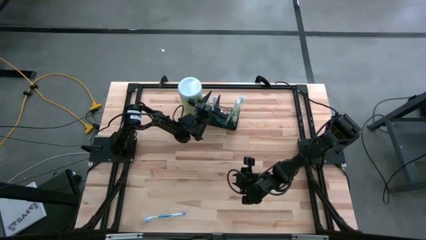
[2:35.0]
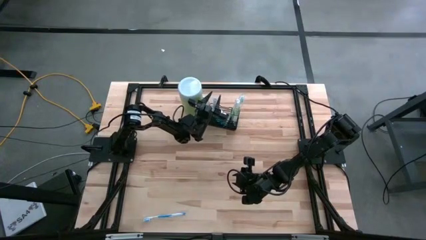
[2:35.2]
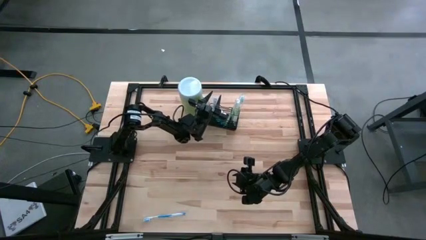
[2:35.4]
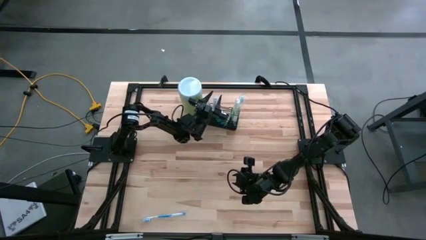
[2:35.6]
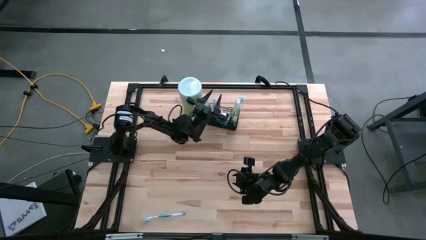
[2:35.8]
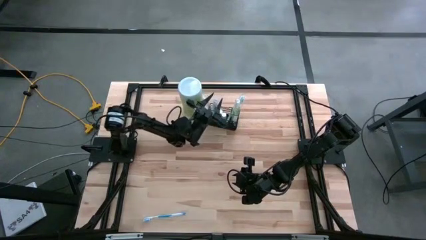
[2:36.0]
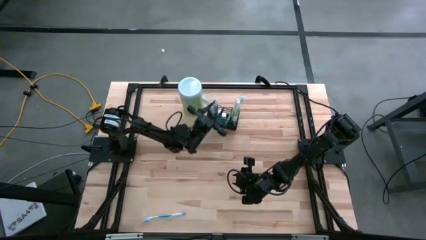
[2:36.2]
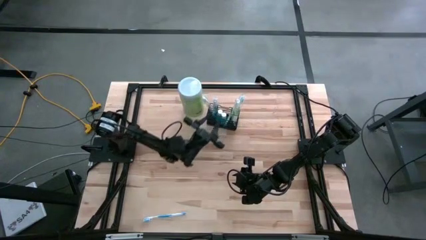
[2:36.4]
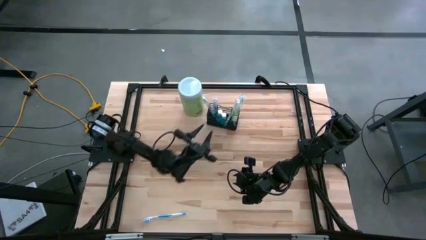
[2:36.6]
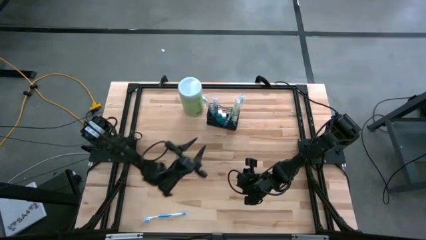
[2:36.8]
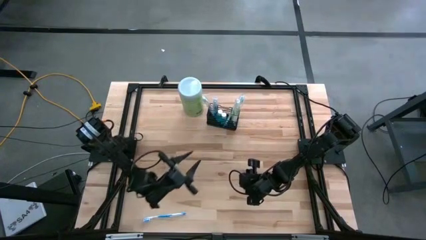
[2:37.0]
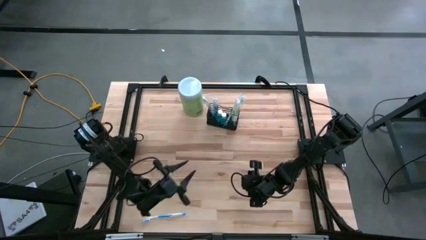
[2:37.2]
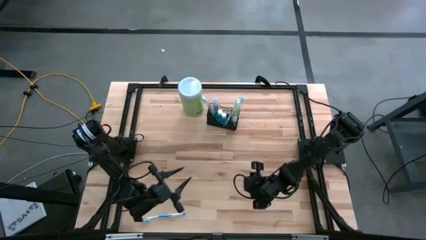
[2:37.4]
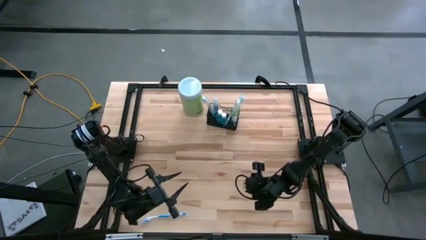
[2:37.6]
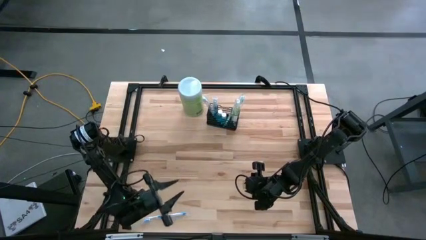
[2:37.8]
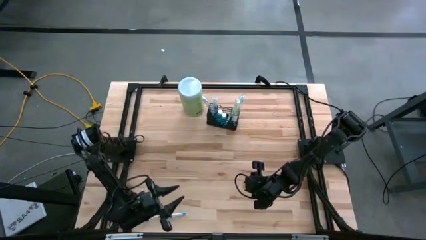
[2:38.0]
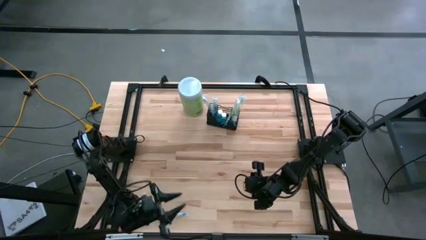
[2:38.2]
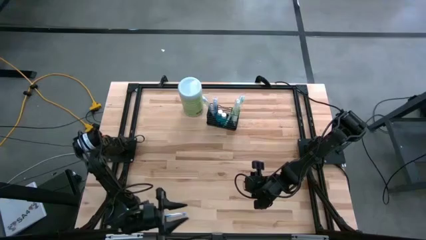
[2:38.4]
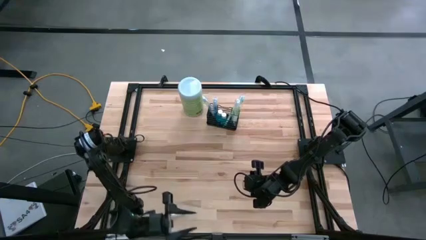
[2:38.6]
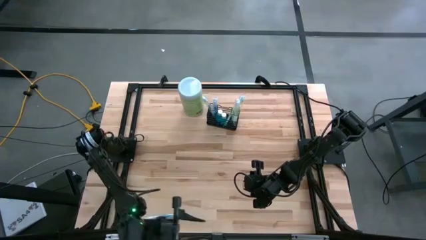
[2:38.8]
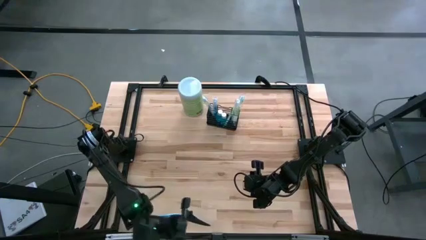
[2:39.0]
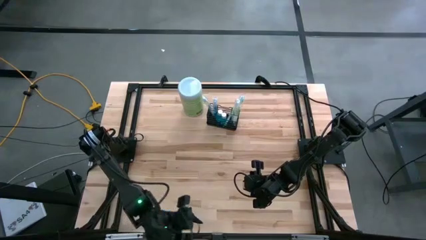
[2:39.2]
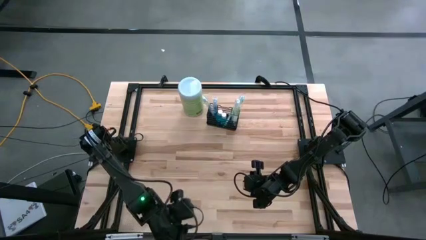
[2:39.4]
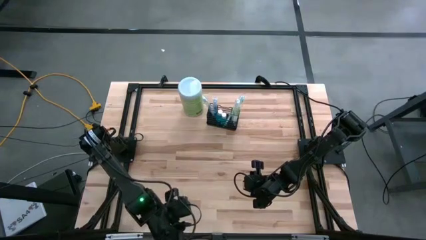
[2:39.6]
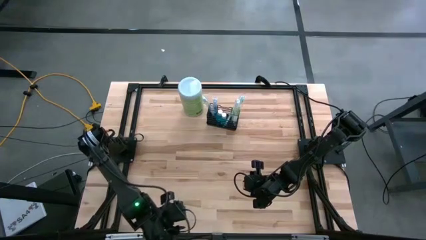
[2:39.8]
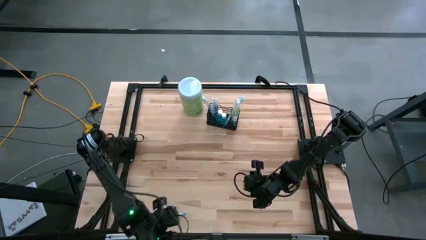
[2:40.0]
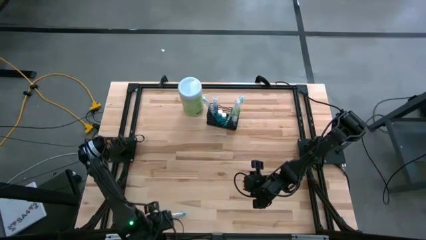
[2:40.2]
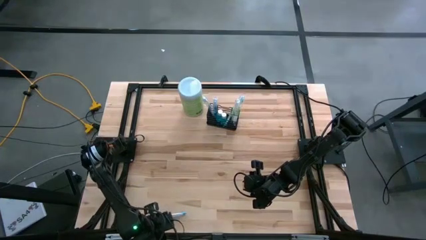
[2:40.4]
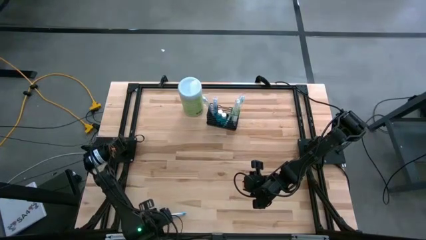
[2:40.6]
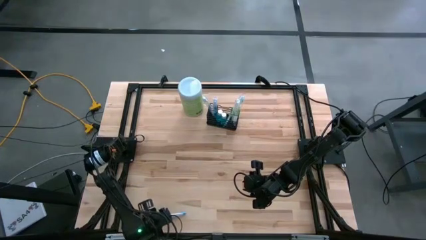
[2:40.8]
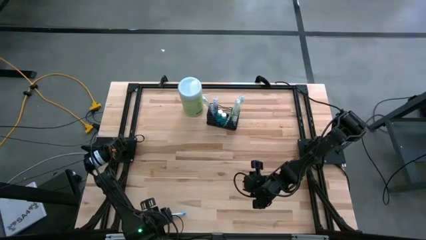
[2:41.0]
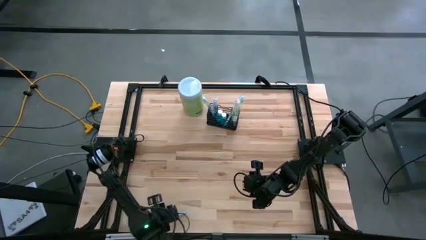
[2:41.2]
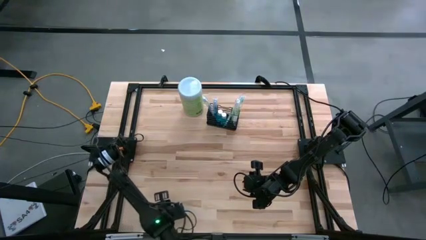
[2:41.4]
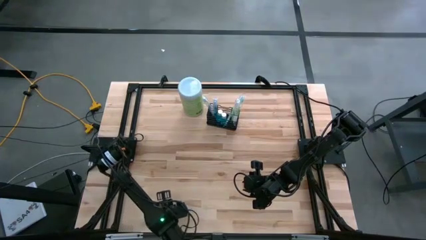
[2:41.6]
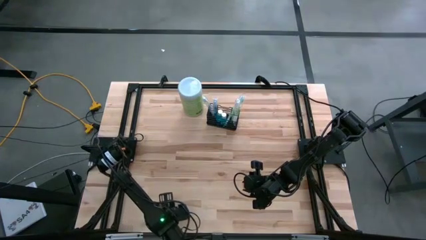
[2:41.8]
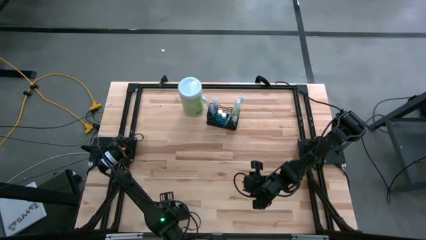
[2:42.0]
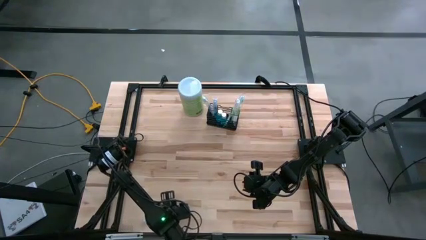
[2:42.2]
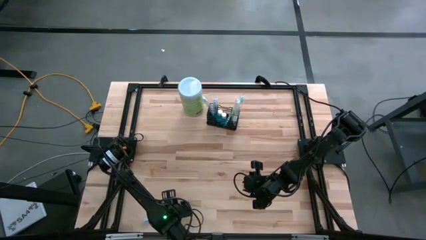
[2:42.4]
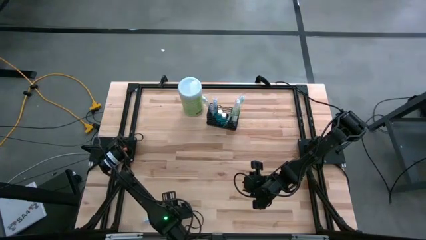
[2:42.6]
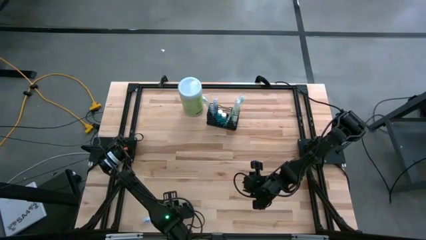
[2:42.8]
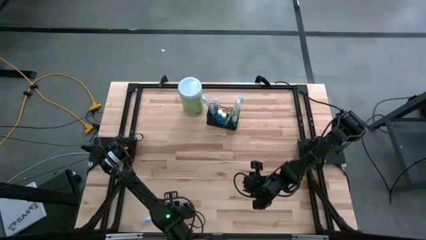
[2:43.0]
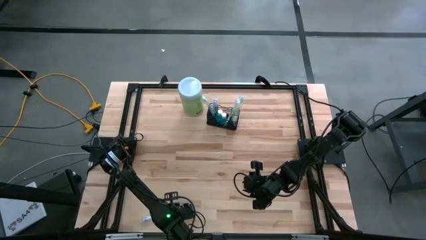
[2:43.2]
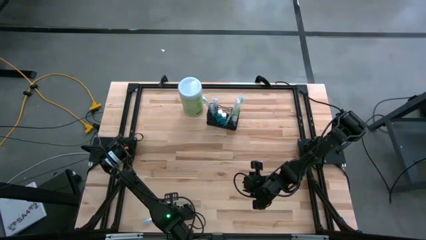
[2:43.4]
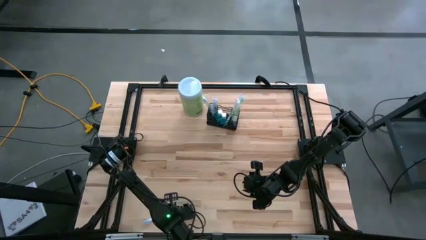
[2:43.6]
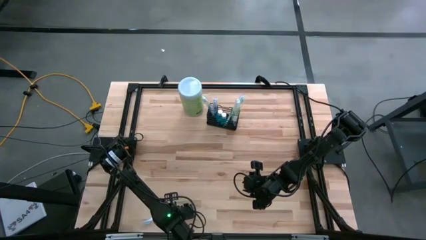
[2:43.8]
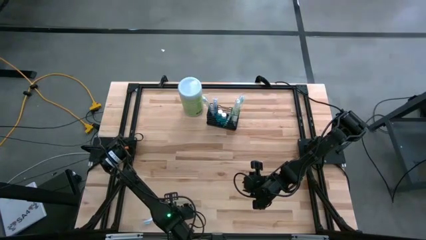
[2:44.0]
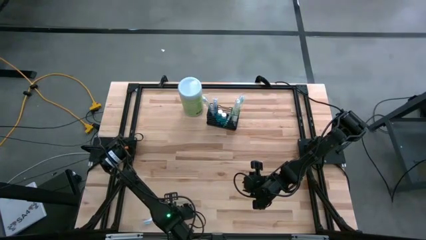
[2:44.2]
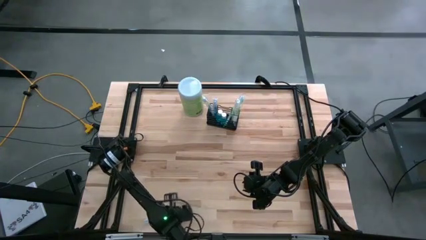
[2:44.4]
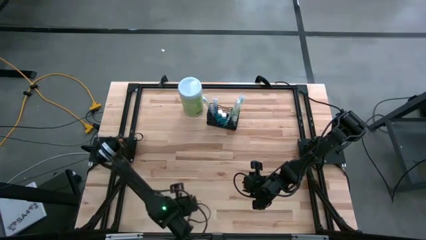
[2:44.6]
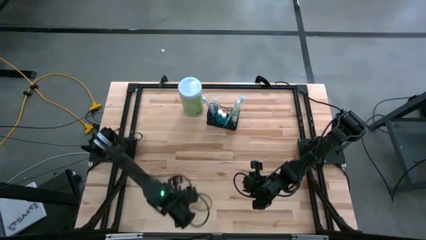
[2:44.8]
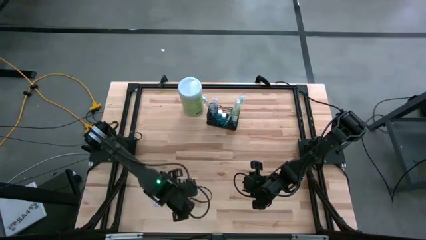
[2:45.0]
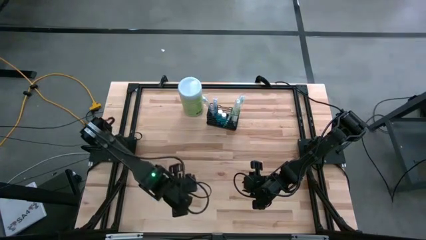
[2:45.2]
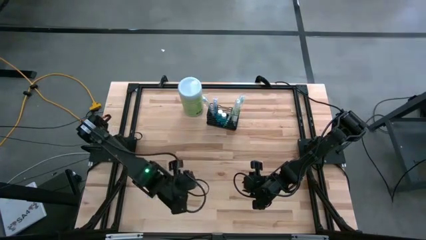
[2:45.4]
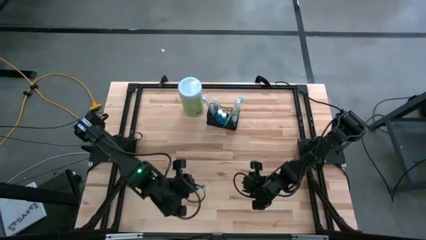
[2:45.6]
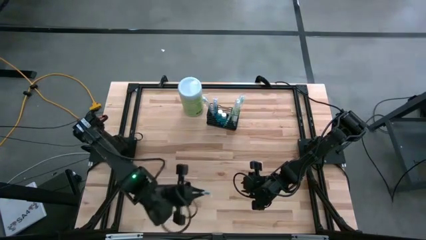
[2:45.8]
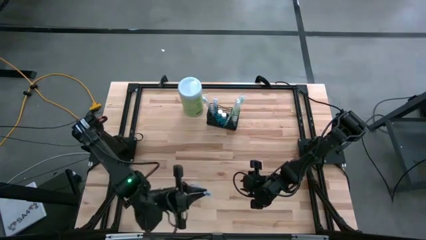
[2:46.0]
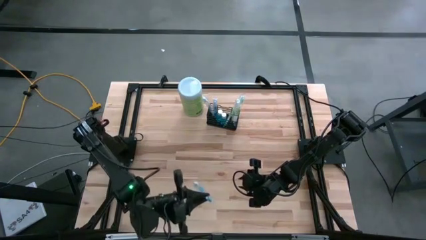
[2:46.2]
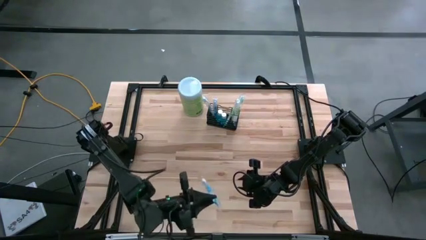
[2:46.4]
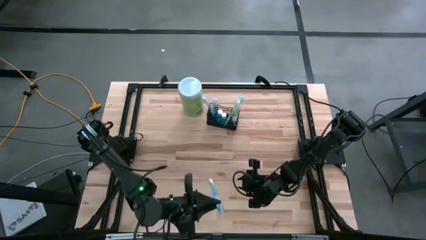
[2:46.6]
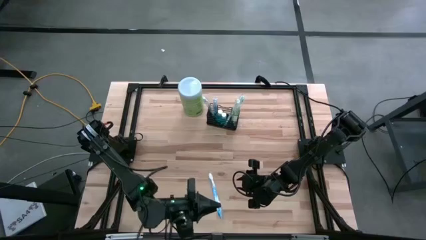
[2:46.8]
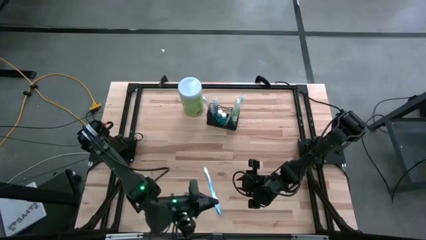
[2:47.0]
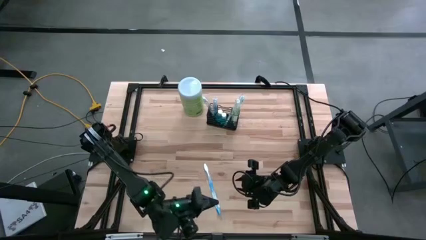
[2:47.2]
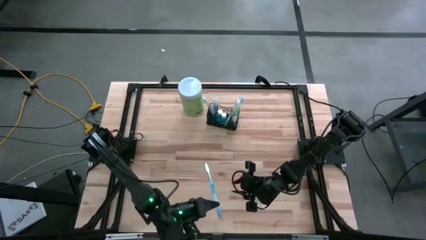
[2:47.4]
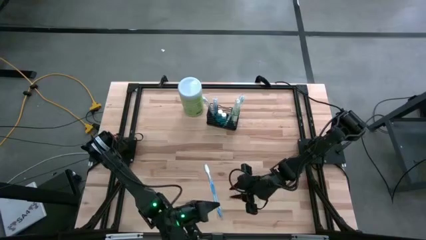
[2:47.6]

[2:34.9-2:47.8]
Task: Pick & Place toothbrushing station
Put the blue toothbrush into the mesh organizer

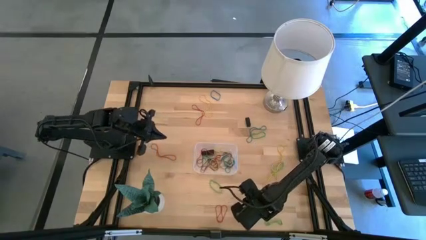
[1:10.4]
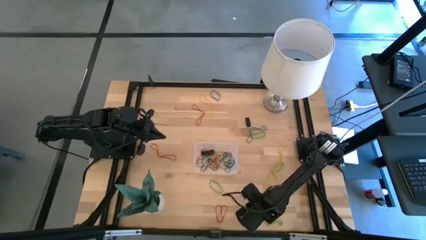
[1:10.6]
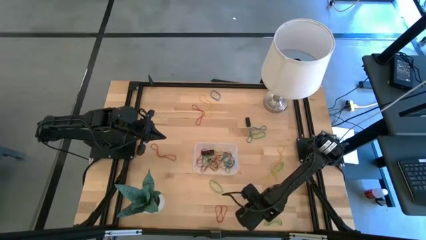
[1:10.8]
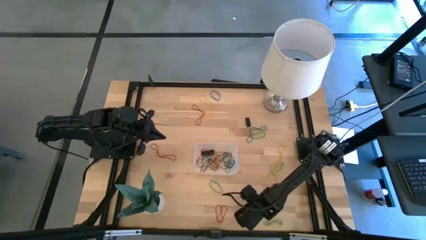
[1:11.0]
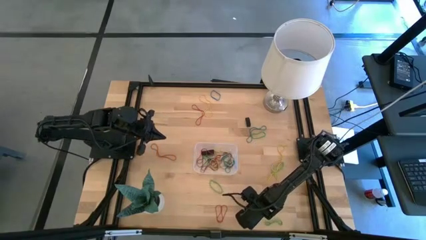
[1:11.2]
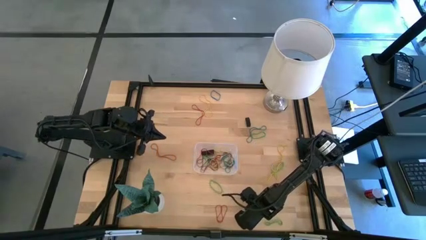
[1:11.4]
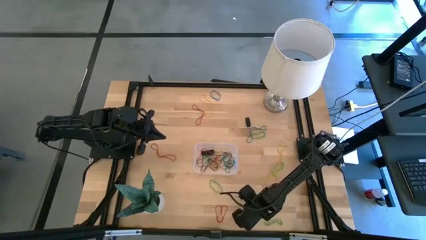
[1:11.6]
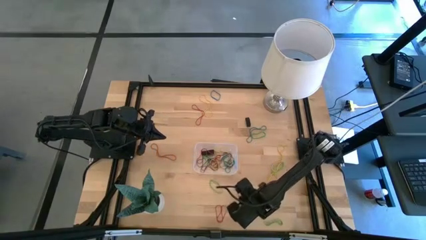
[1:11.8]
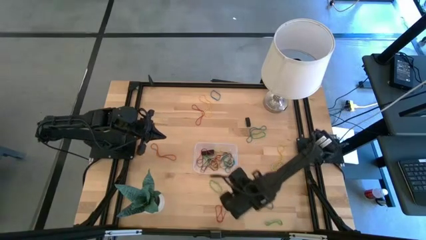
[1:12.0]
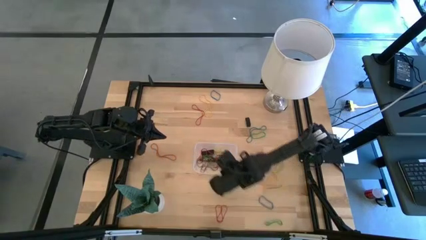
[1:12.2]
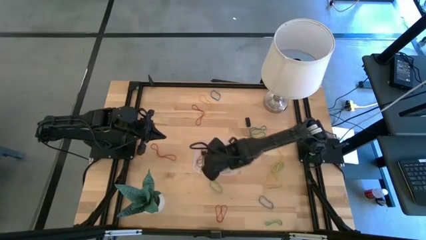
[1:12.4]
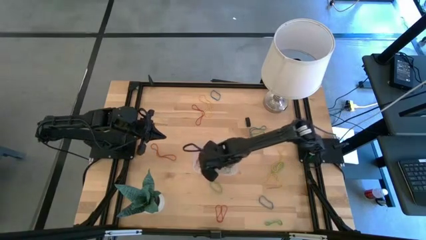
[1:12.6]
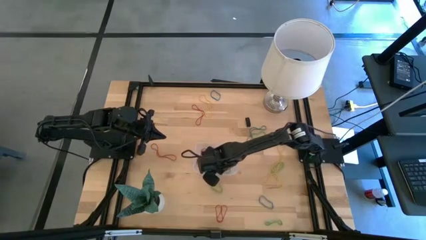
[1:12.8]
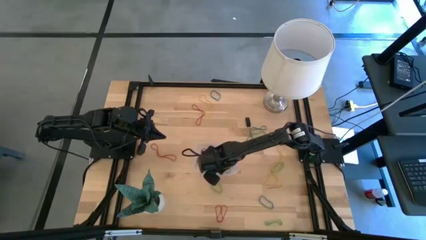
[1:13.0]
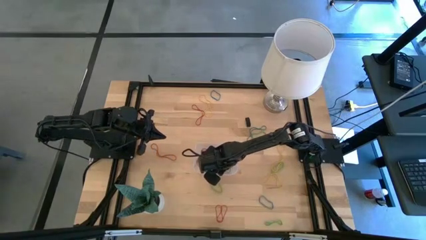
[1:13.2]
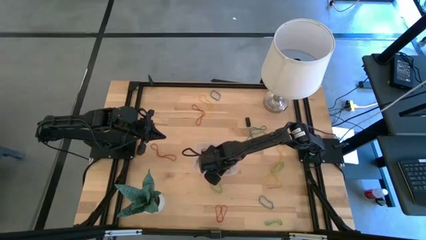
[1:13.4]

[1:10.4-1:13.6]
Task: Pick and place rubber bands into bin
Put the black rubber band into the transparent bin
